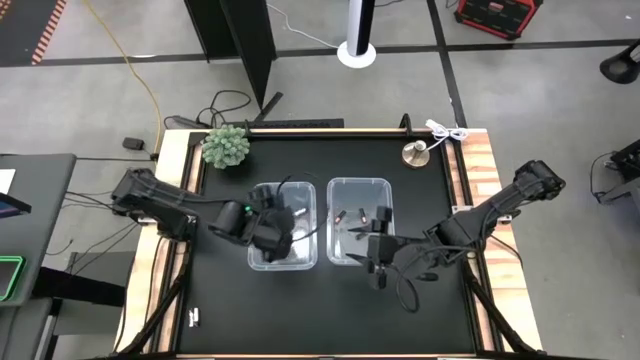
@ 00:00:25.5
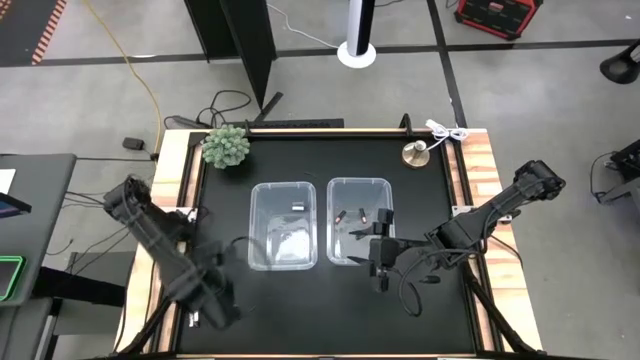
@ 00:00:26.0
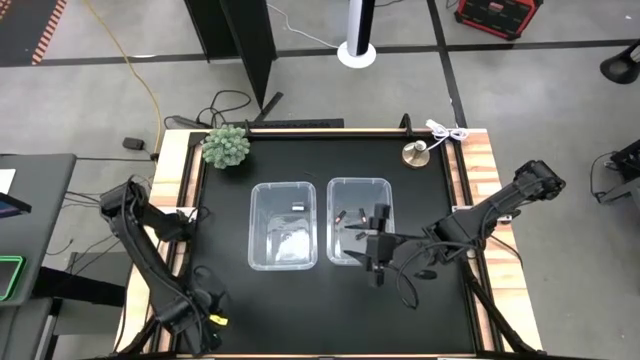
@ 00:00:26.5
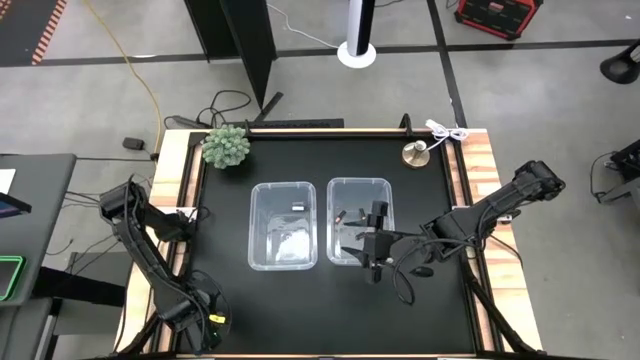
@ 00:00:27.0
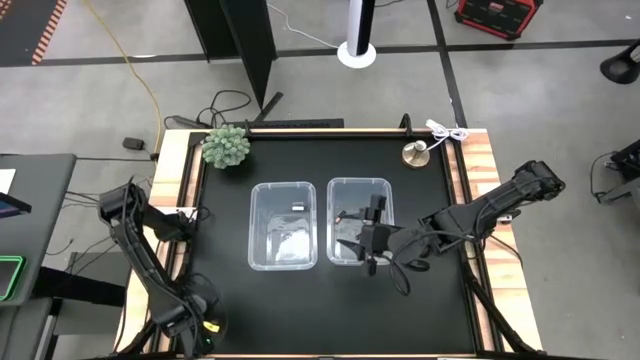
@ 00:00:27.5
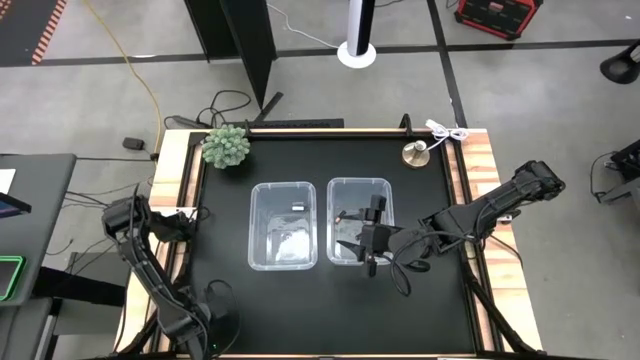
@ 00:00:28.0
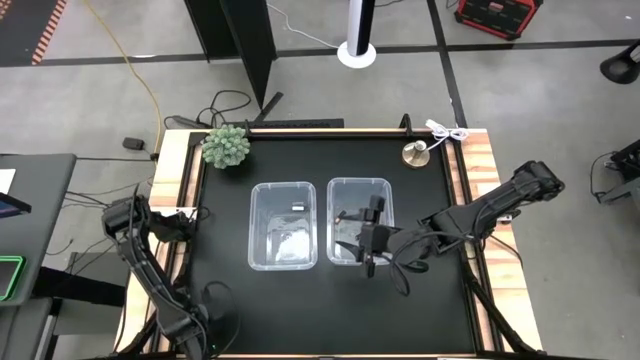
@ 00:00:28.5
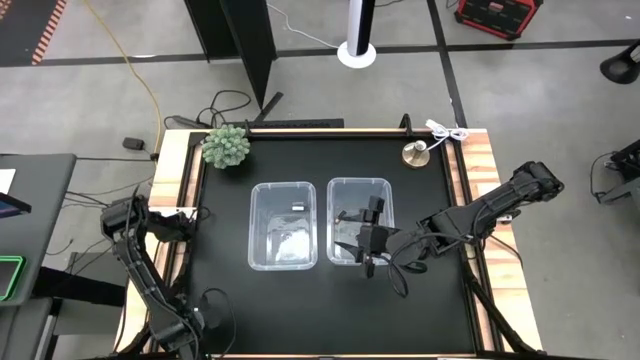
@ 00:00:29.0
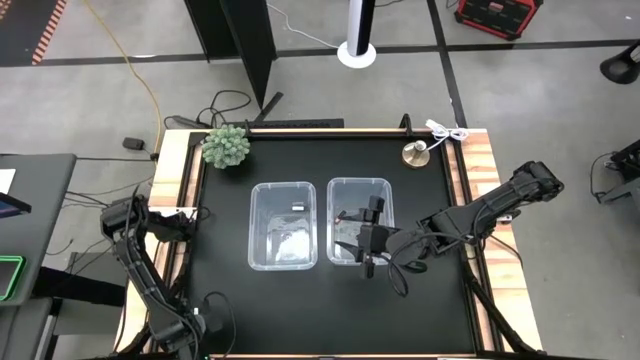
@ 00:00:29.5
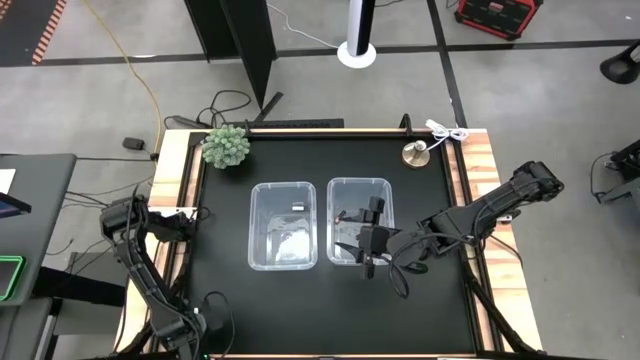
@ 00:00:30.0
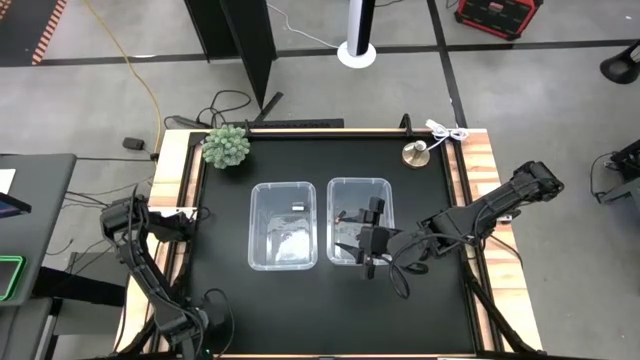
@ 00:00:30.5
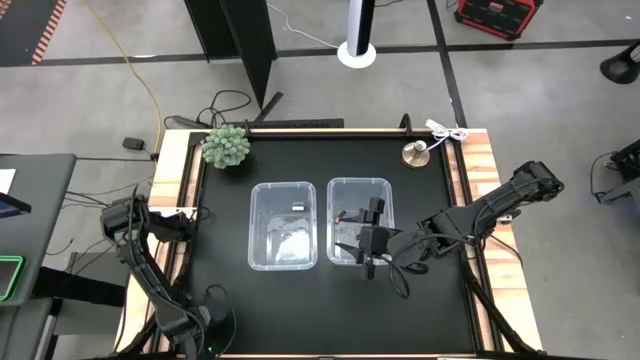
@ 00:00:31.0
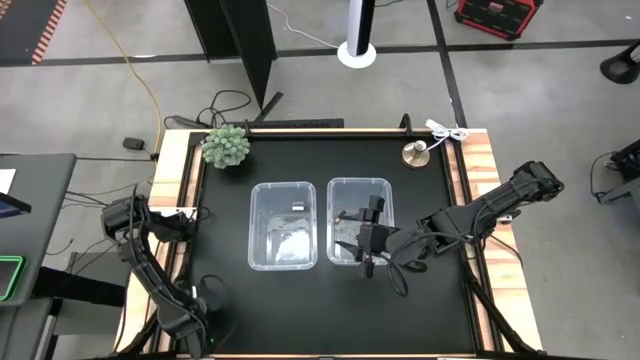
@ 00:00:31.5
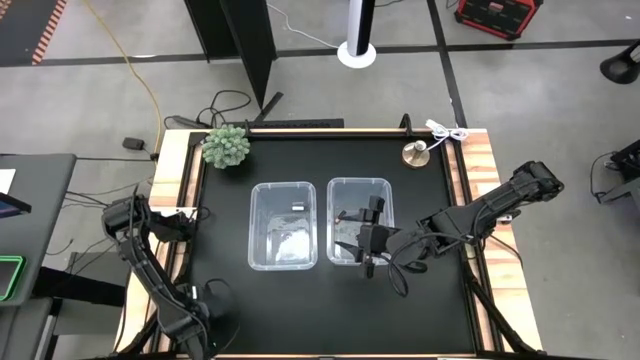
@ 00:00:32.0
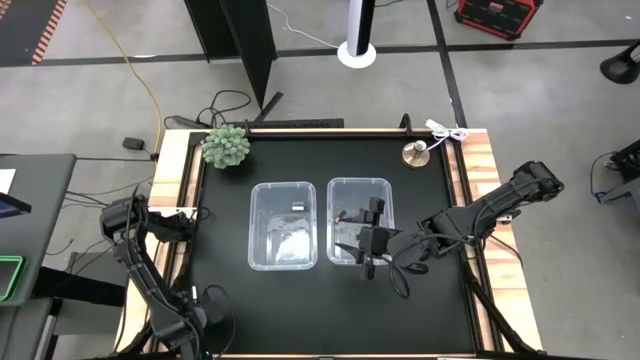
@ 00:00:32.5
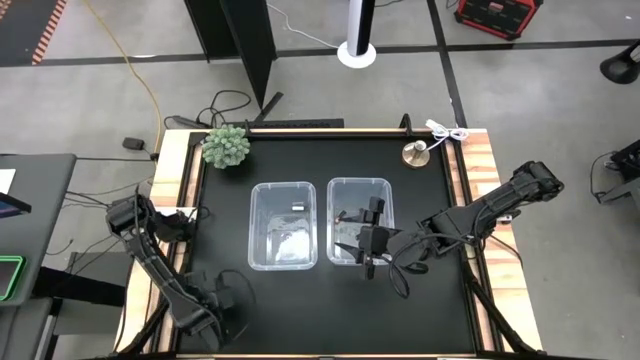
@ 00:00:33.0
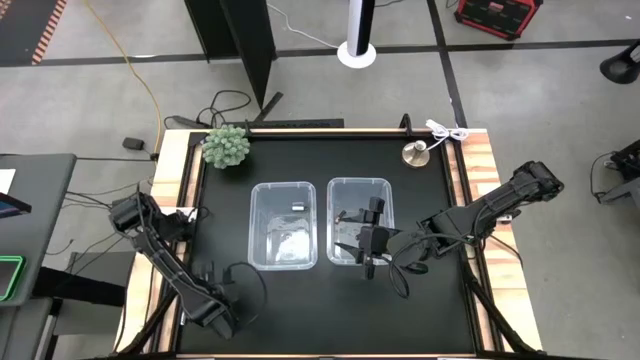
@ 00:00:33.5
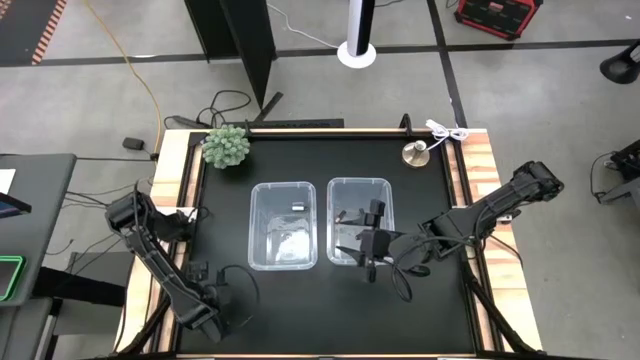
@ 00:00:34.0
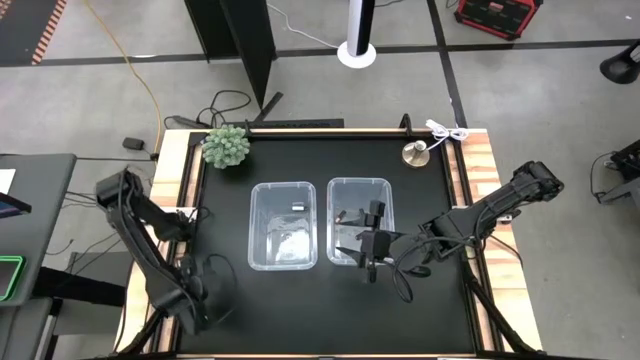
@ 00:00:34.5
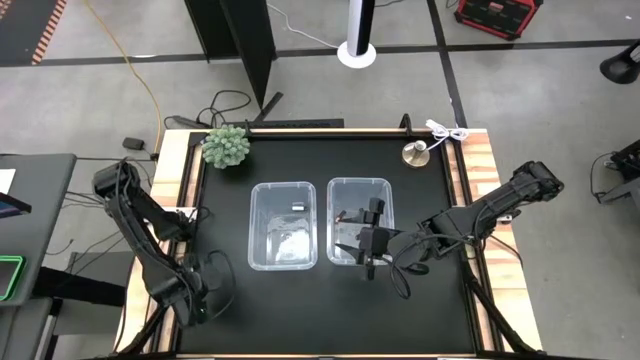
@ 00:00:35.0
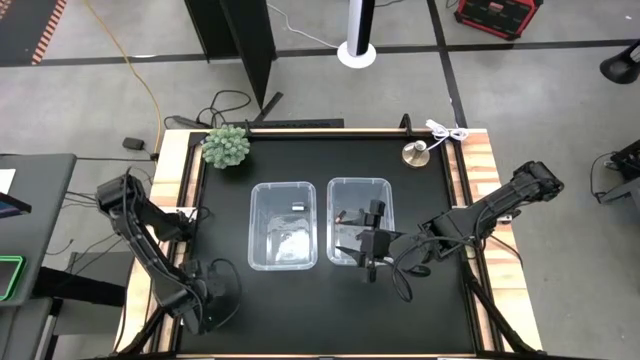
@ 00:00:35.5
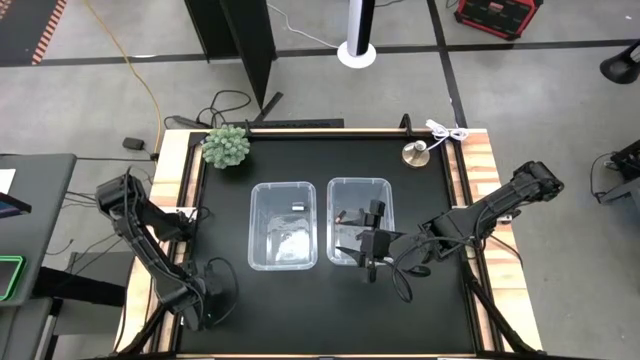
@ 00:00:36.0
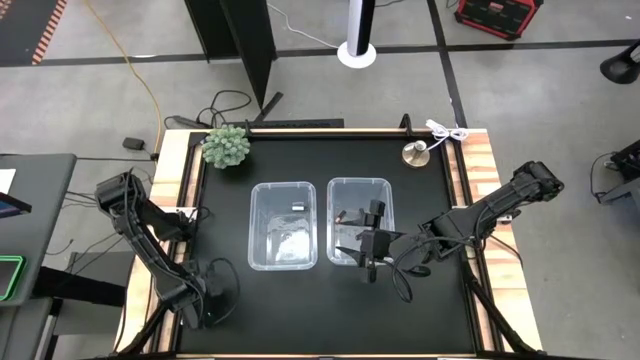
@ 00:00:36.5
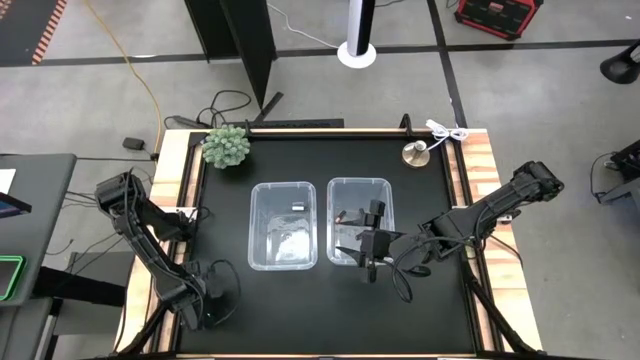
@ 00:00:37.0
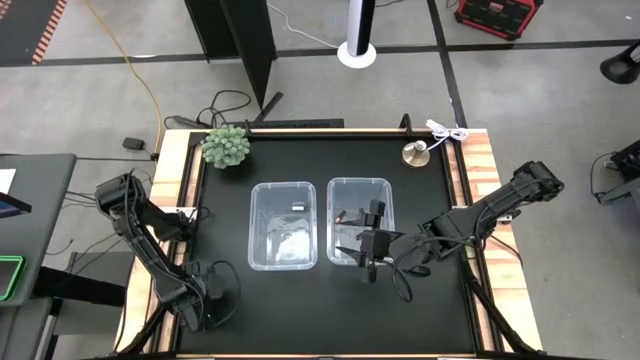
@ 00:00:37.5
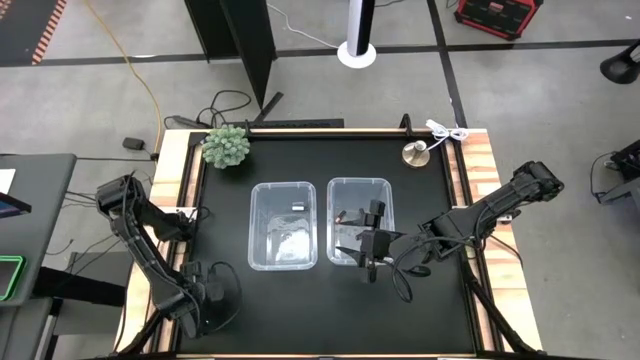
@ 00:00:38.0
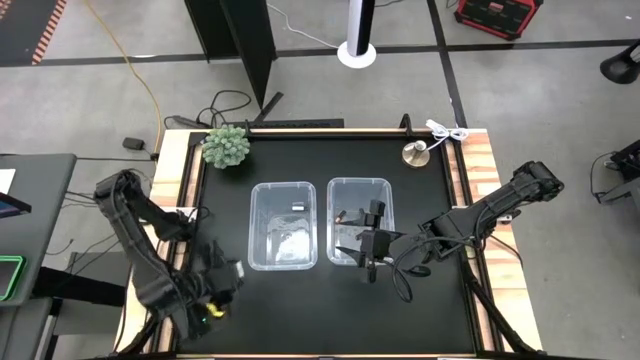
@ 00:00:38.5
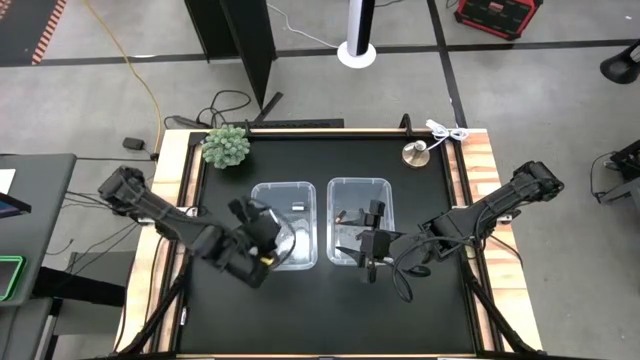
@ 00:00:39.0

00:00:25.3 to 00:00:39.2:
Task: Sort batteries
Put the top silver battery into the left transparent bin

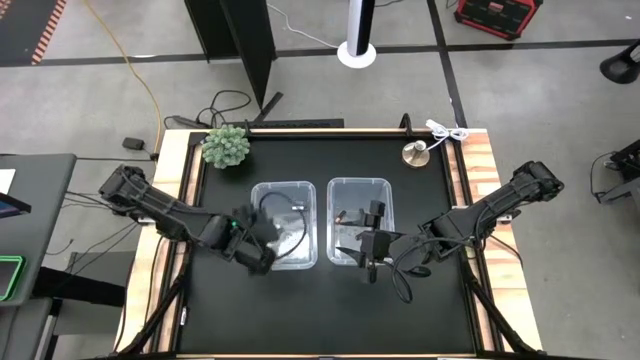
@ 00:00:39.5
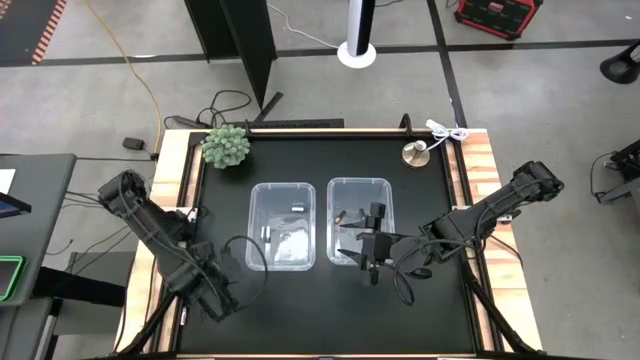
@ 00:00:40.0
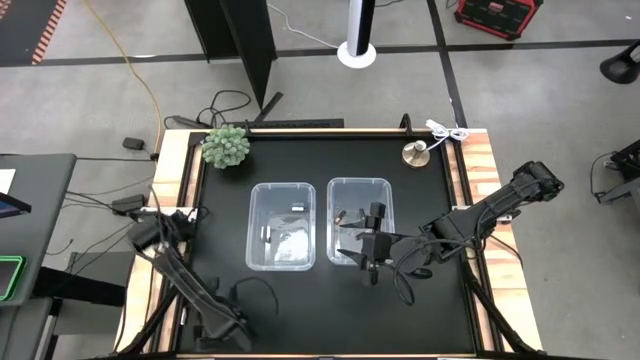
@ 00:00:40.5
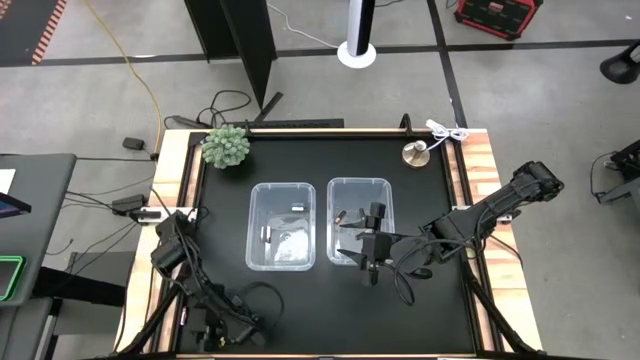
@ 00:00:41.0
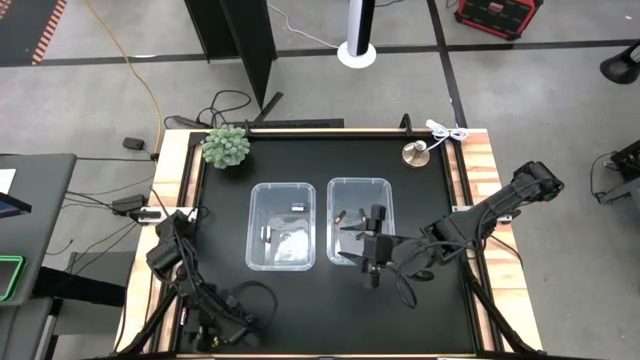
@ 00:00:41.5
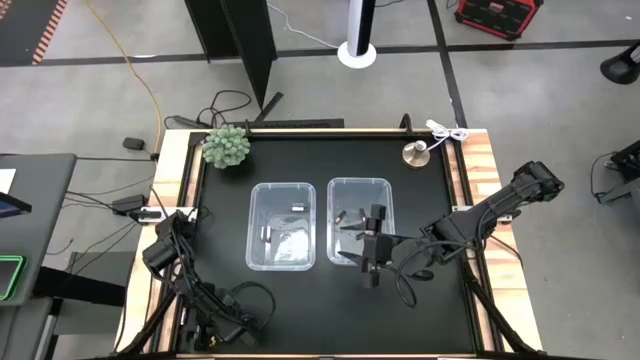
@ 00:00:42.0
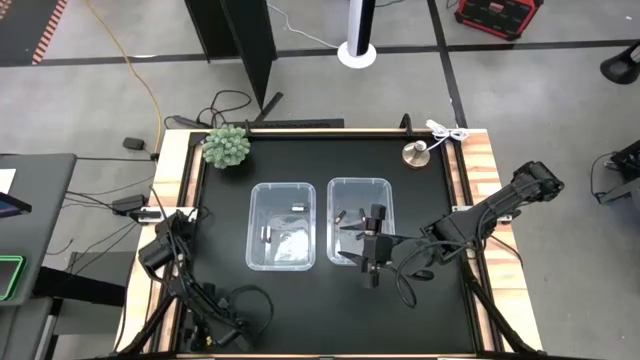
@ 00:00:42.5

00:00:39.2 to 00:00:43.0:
Put the silver battery into the left transparent bin

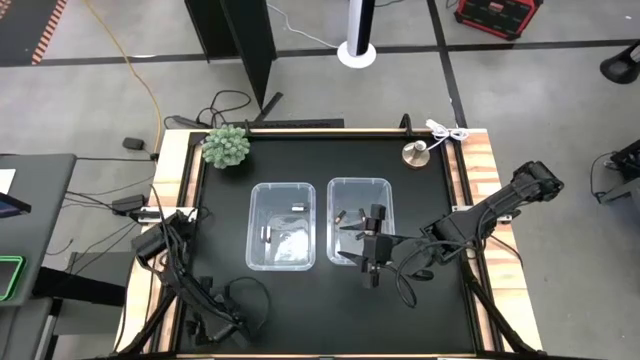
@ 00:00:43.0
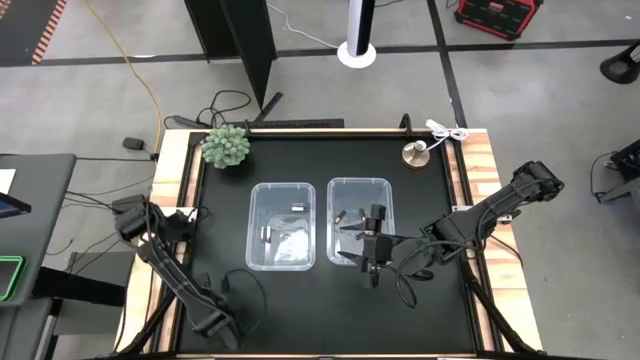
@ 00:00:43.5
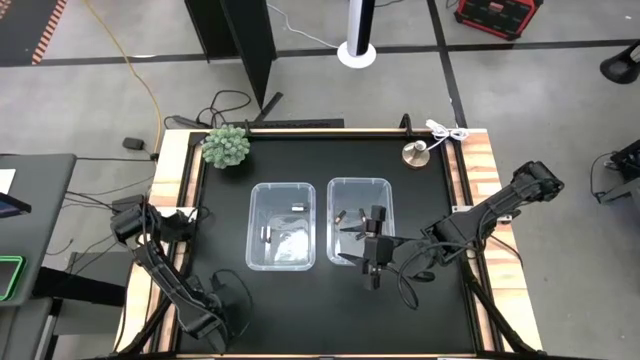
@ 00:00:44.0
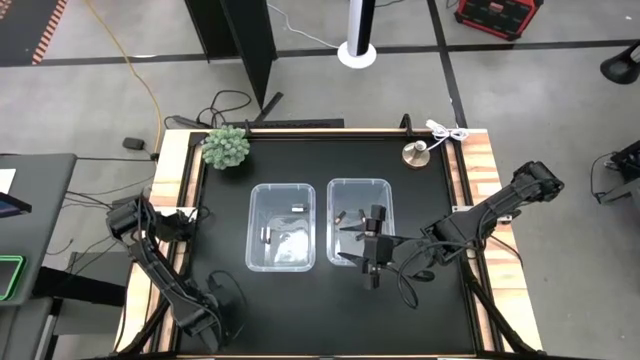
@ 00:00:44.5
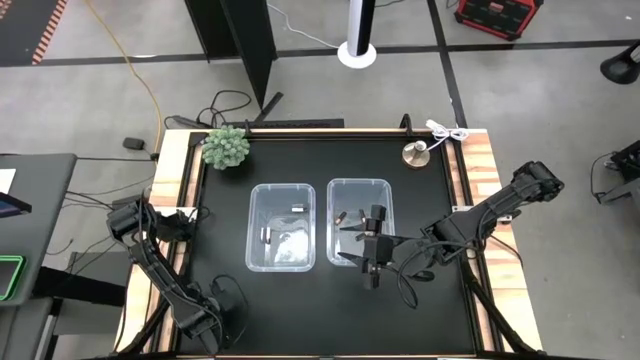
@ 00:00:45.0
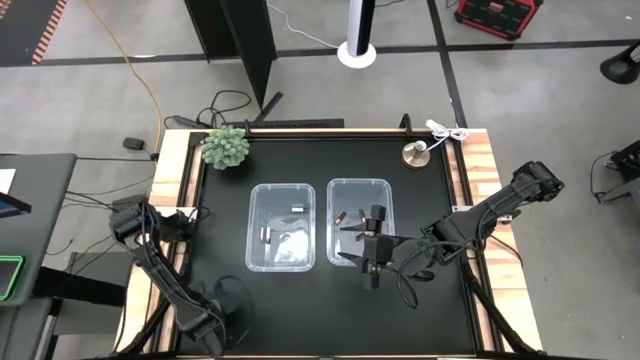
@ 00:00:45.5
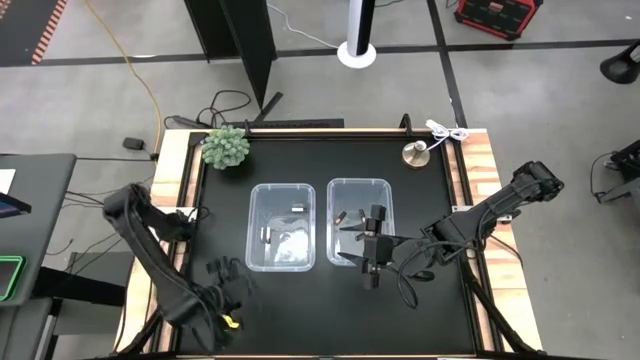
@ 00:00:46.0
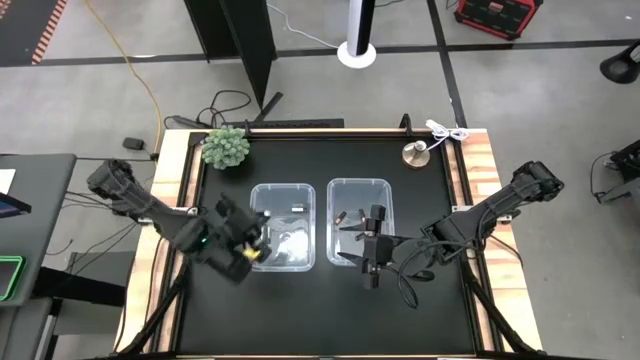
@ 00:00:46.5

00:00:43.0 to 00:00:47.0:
Put the silver battery into the left transparent bin
